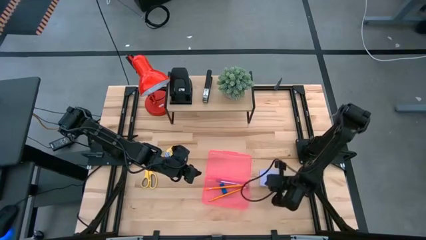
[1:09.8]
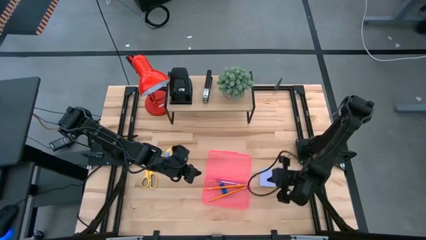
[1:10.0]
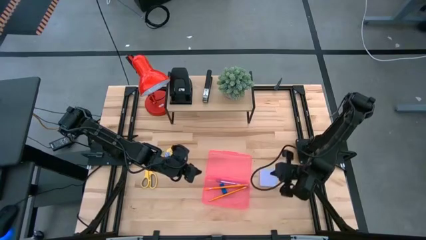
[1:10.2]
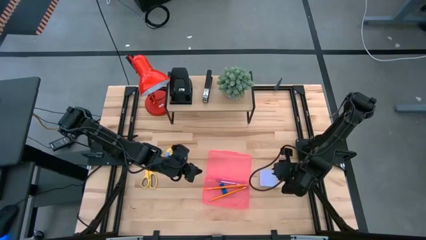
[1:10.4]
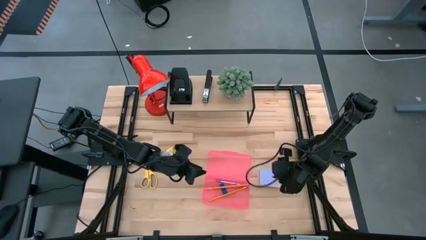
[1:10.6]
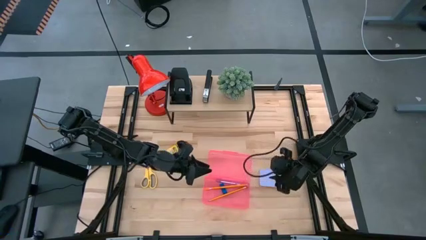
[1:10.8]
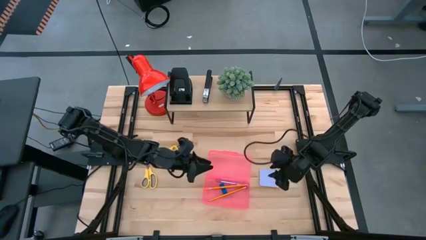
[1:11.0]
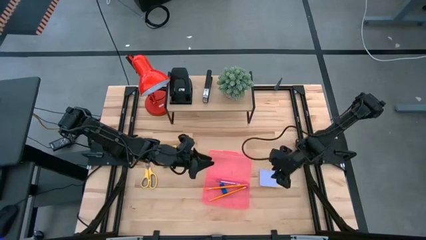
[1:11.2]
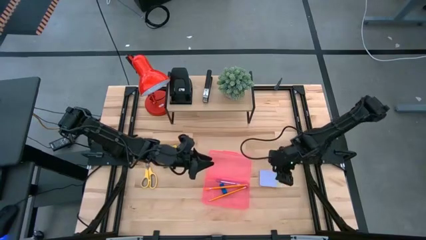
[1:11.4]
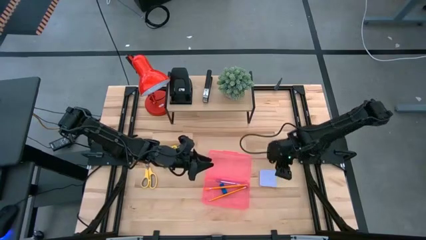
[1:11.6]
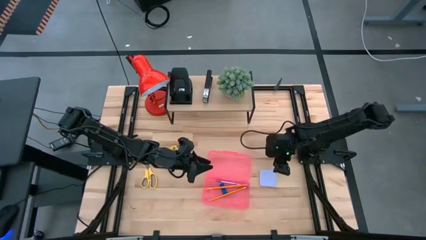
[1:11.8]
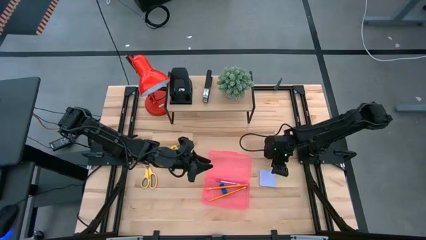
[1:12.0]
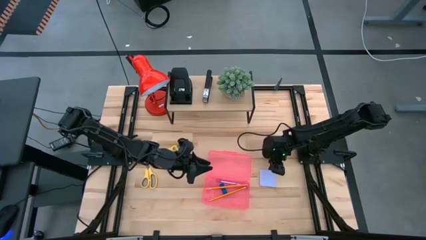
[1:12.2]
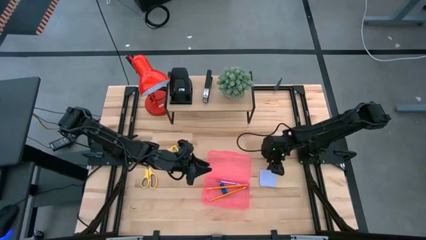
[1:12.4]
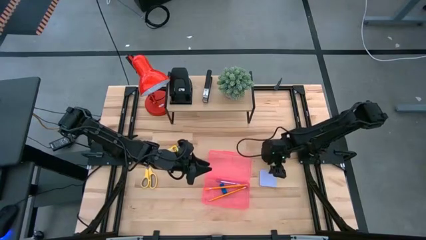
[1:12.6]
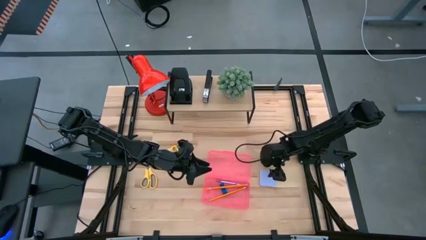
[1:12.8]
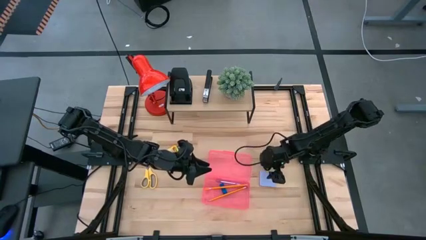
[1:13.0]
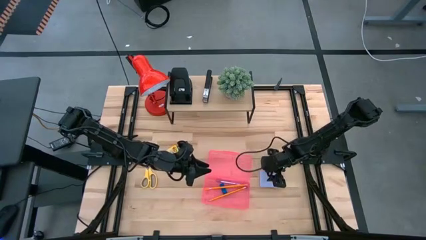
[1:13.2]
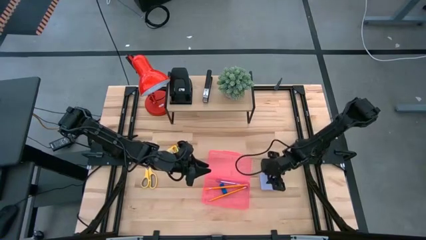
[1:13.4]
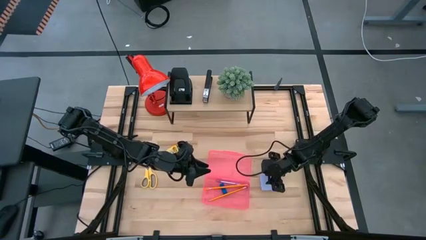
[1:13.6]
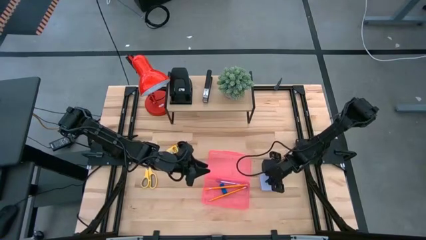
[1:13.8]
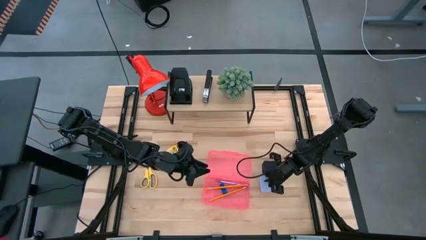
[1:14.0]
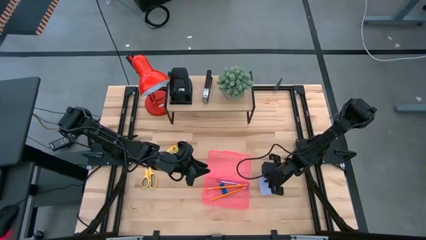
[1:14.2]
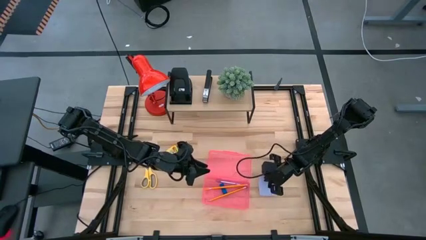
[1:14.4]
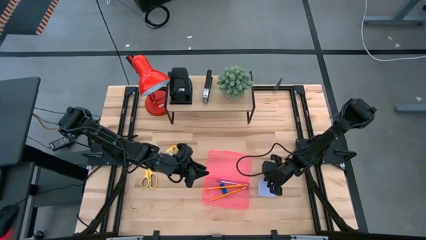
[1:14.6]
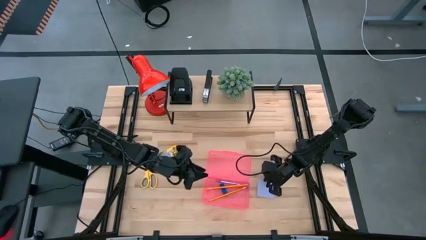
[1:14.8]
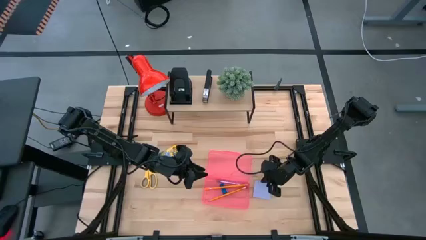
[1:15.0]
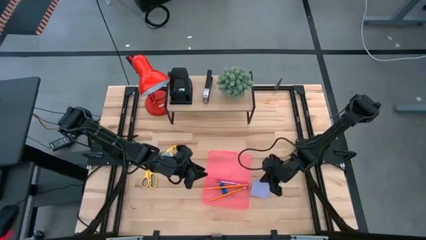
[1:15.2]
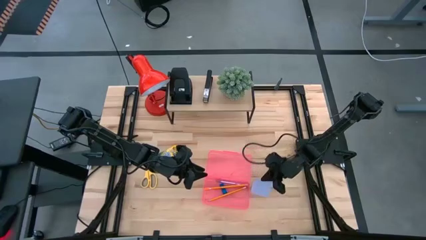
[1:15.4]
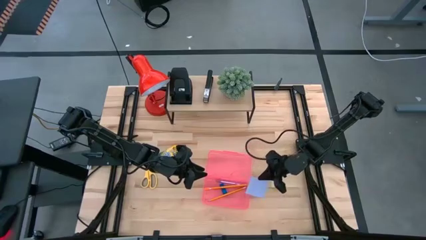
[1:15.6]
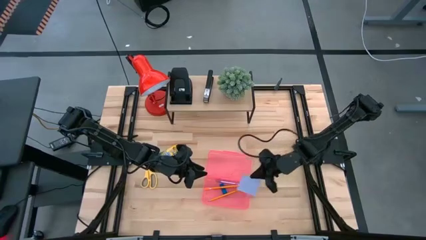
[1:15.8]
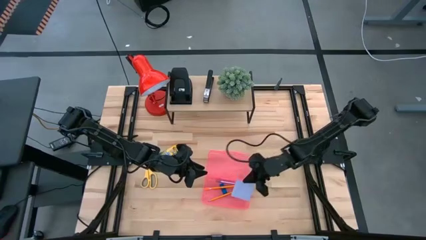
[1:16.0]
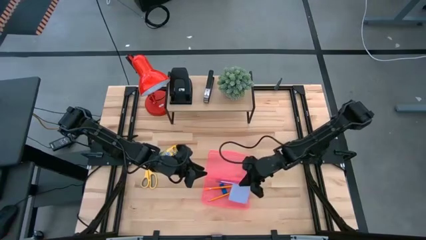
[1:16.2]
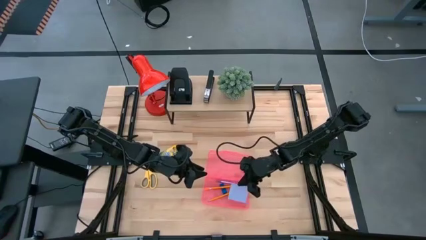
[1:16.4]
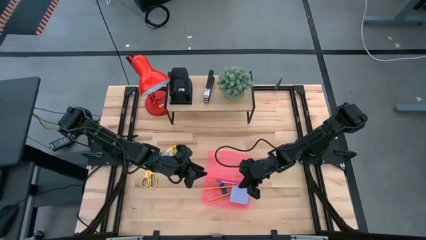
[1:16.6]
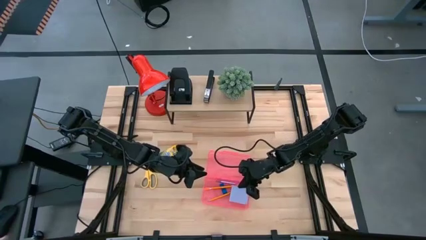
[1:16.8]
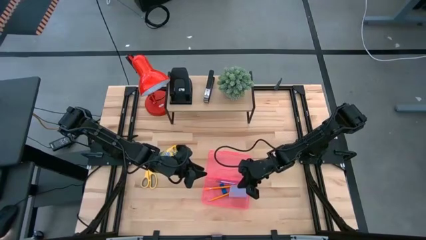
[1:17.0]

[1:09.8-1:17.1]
Task: Pack school essentials
Put the purple sticky notes into the pink supply box

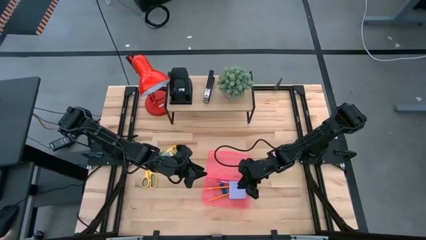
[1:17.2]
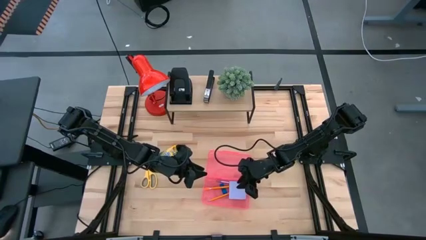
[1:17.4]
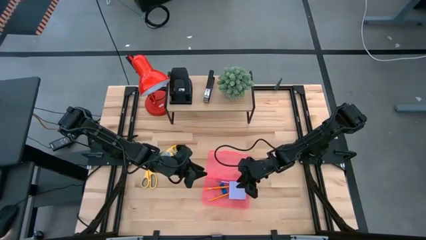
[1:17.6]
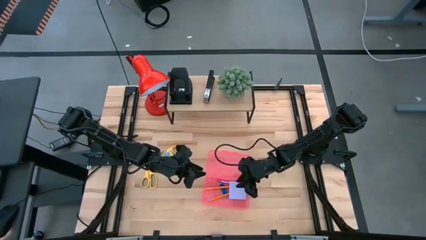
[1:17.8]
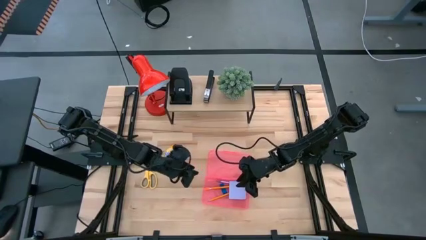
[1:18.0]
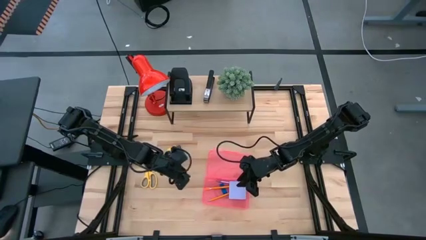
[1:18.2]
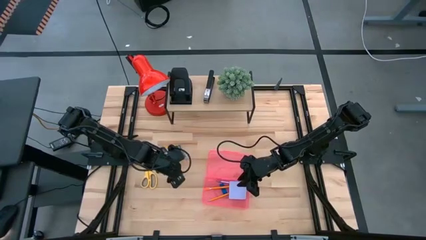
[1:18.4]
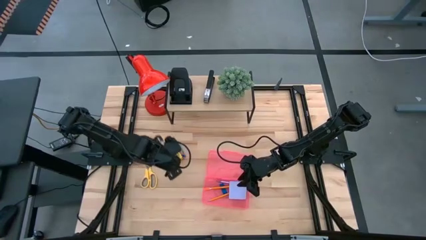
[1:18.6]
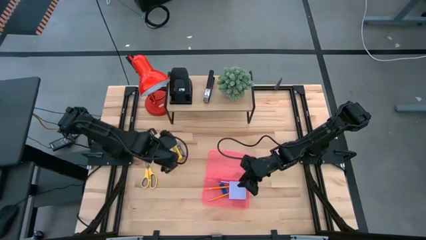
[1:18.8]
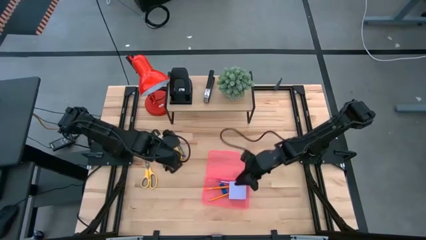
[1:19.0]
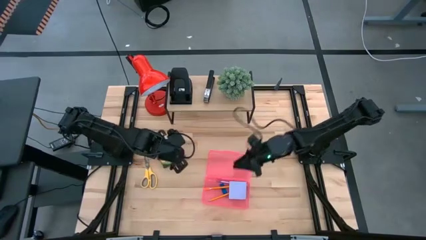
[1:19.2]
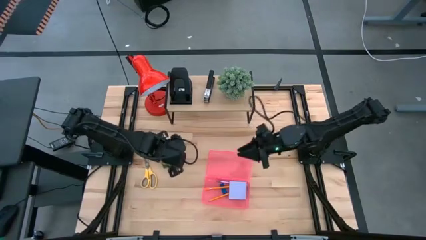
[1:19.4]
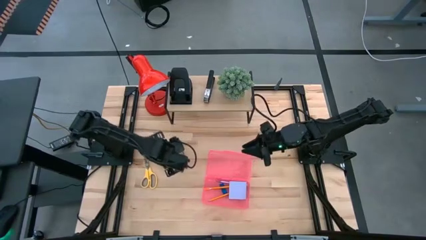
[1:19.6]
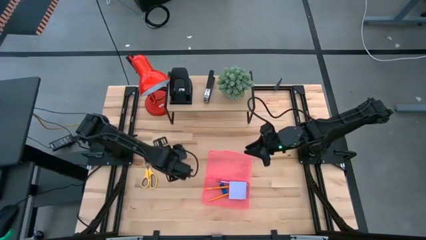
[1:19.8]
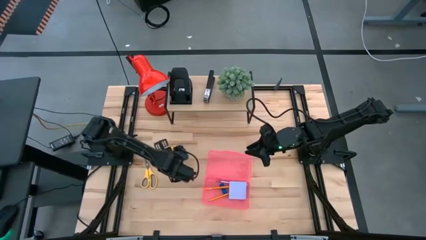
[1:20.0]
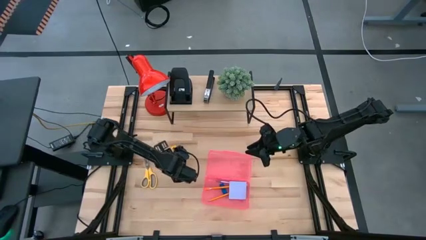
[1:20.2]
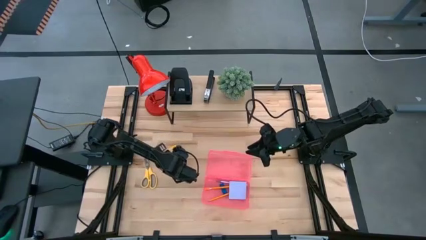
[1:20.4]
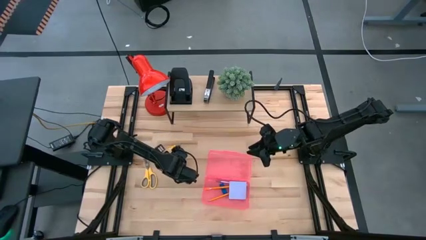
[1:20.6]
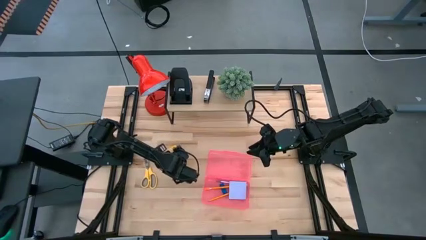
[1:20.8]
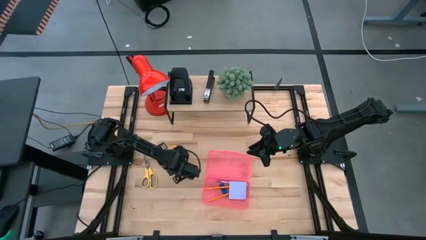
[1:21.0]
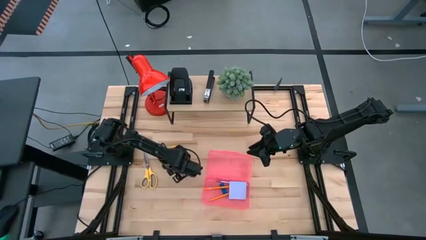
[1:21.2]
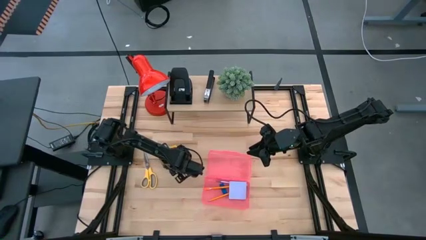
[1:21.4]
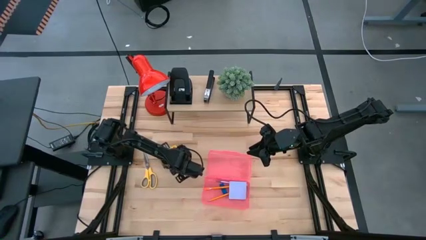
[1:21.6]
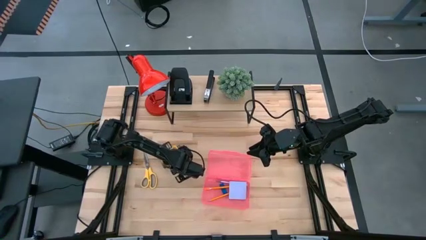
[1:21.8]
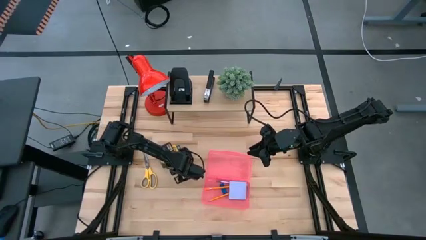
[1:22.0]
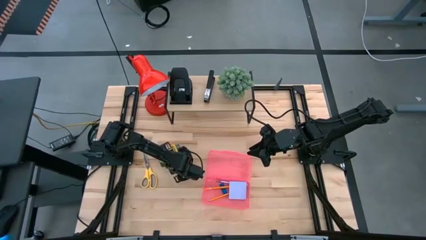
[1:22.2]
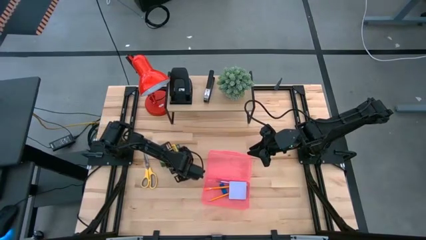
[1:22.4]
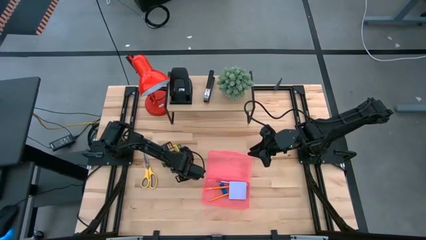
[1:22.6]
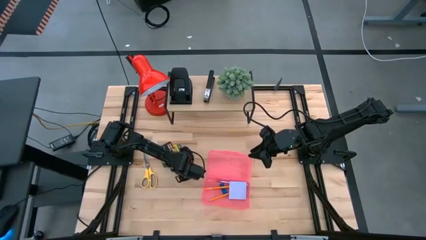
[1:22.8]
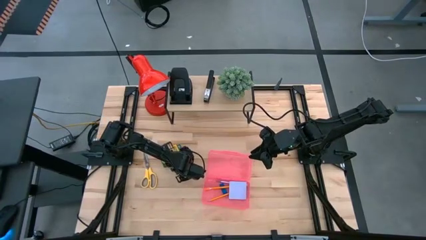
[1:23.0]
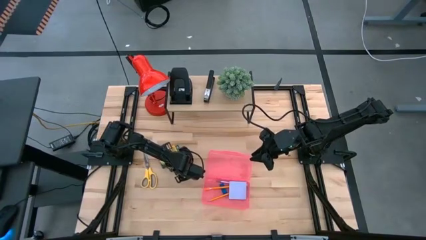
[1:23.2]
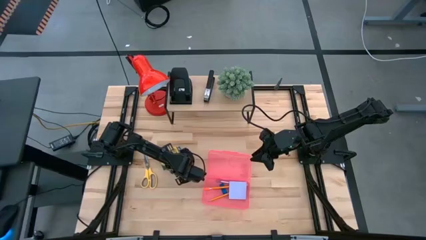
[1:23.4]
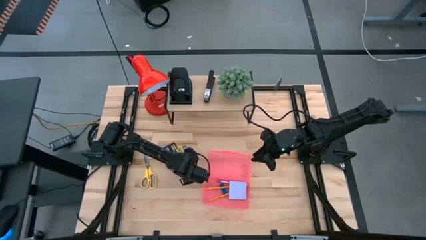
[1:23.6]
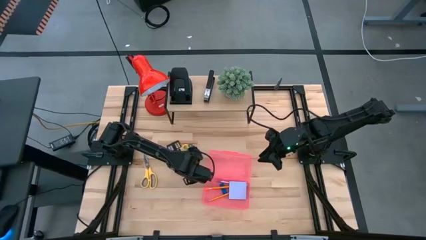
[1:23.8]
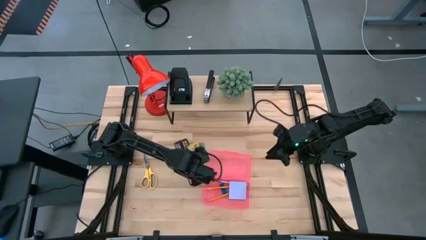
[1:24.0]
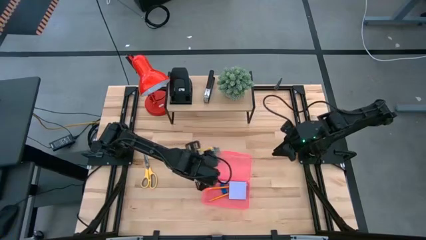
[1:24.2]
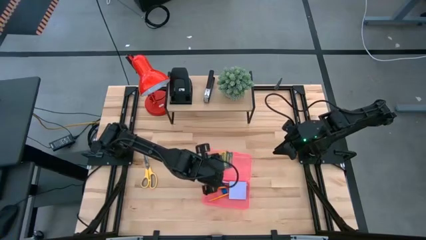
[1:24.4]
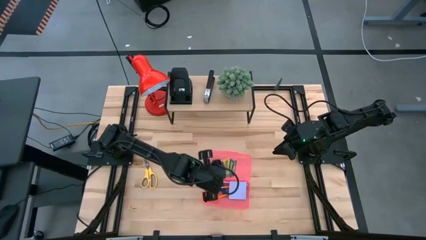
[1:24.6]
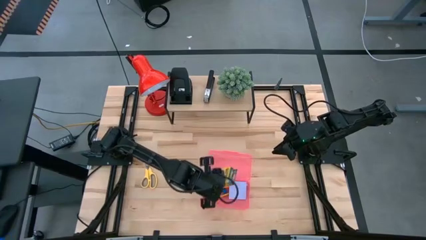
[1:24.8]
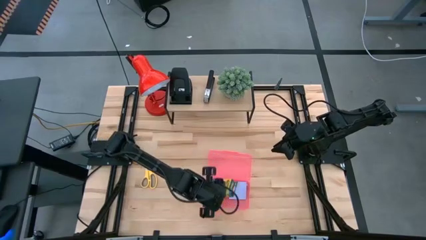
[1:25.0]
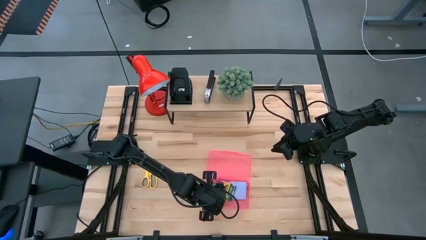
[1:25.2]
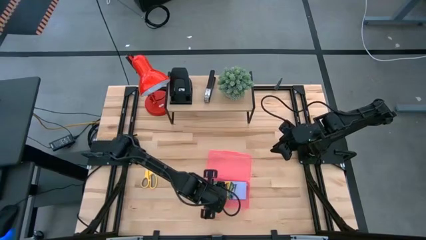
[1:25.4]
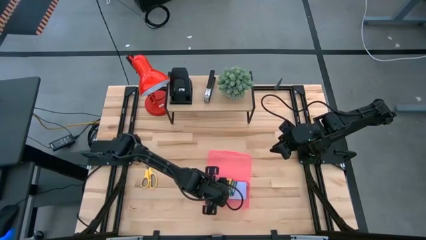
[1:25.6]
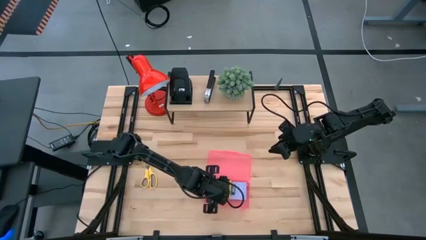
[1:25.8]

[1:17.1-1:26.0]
Put the yellow crayon box into the pink supply box
